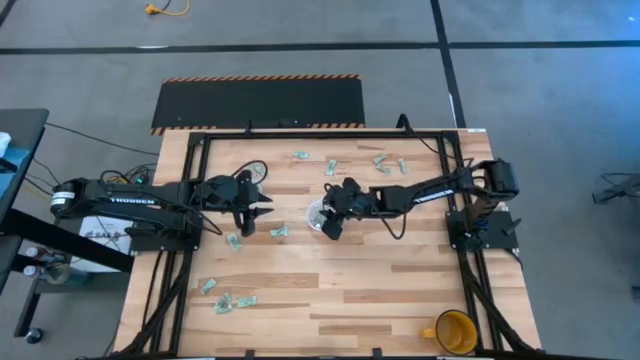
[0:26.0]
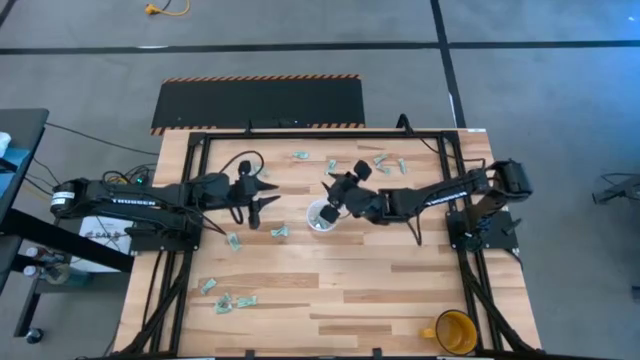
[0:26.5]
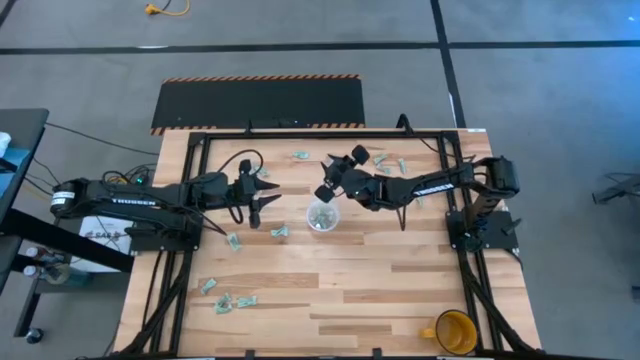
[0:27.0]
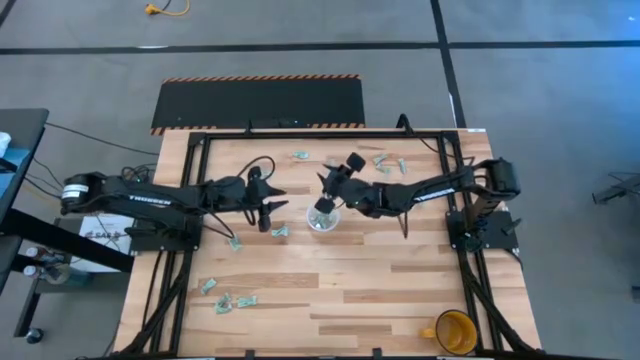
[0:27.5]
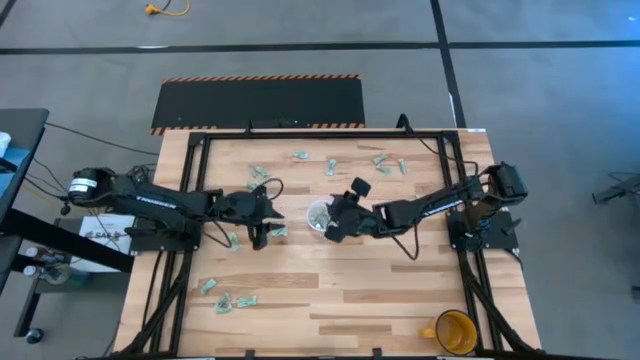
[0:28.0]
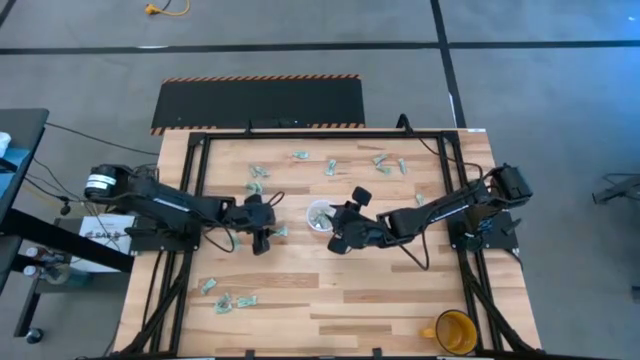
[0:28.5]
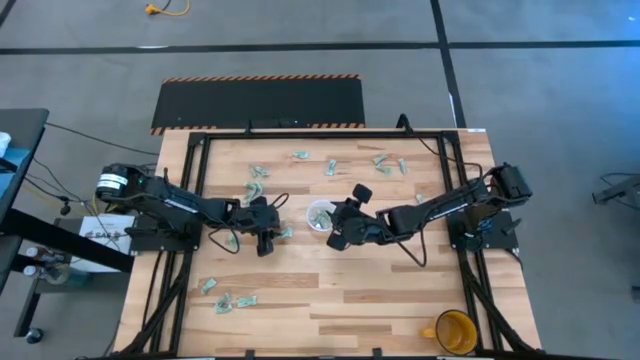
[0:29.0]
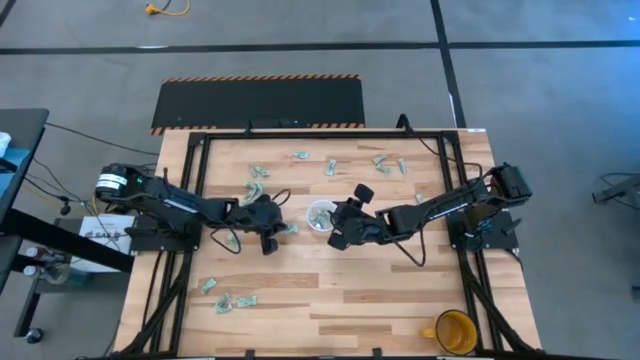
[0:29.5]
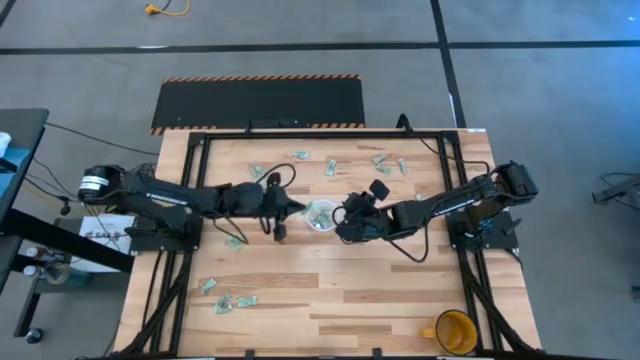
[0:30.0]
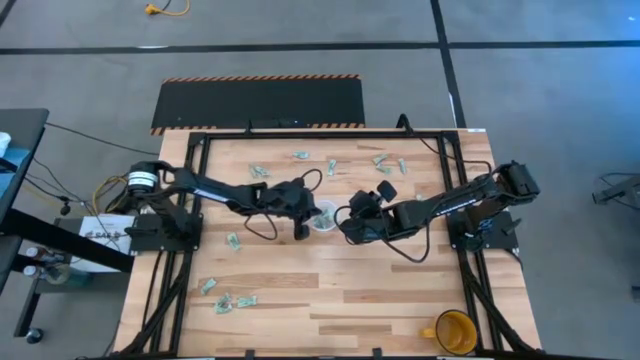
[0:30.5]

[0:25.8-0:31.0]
Task: Pick and place Stevia / Truvia into bins
Put the green stevia packet into the transparent container

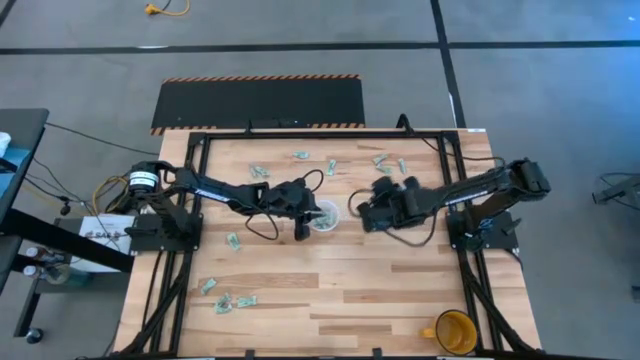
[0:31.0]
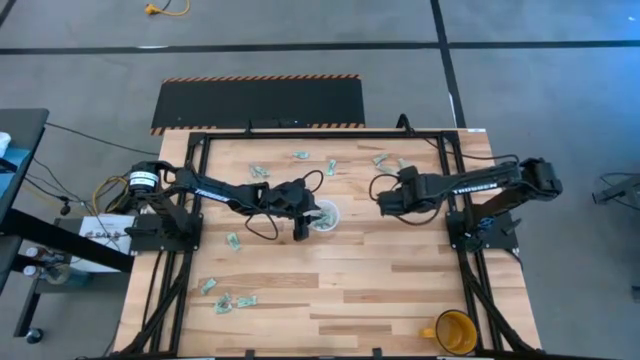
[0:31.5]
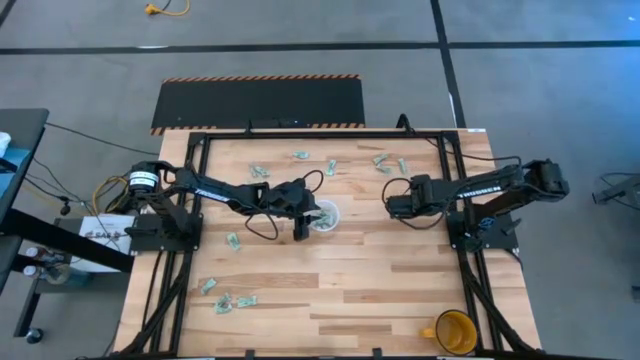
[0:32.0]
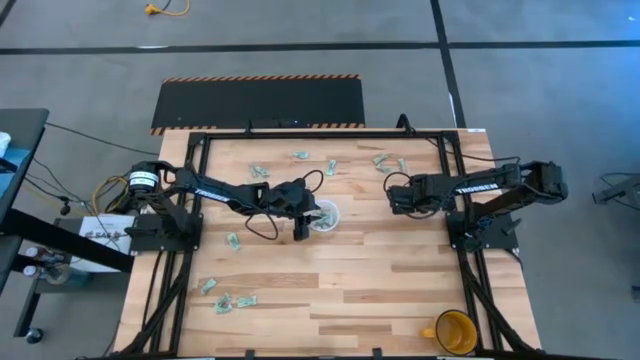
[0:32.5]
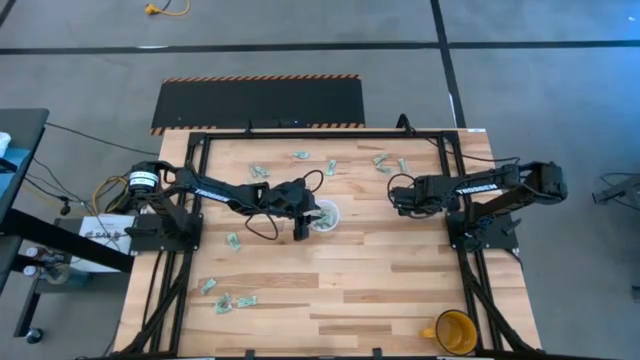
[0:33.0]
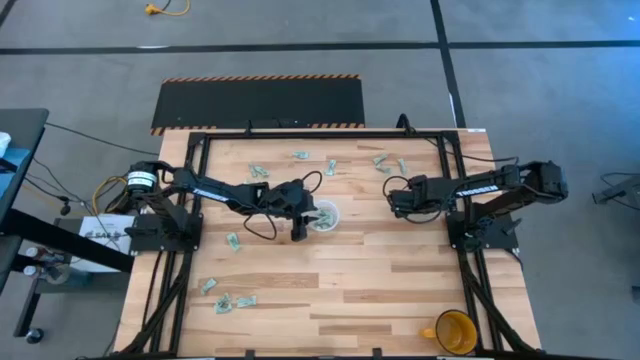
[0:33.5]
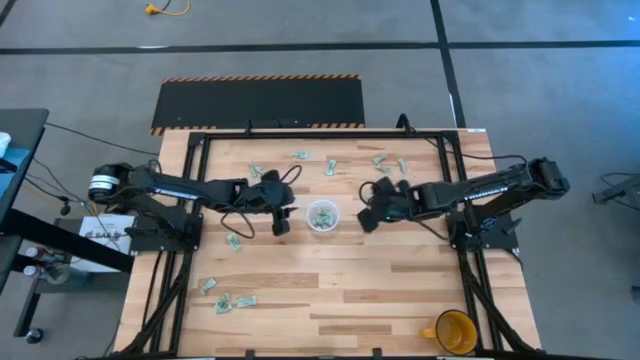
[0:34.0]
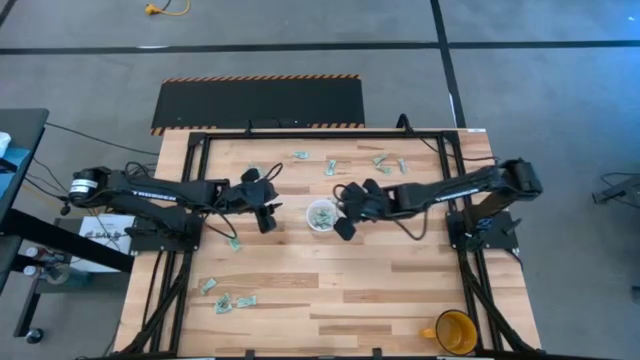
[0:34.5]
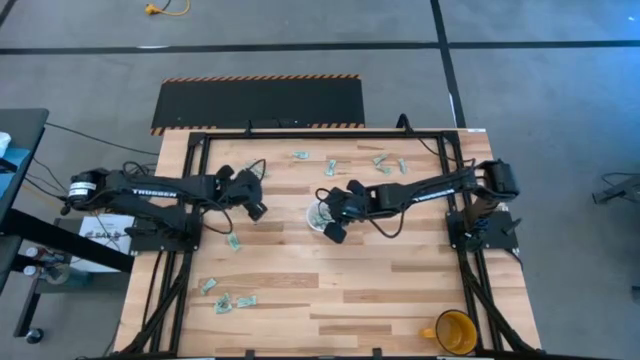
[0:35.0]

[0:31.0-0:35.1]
Put the green stevia packet into the transparent container

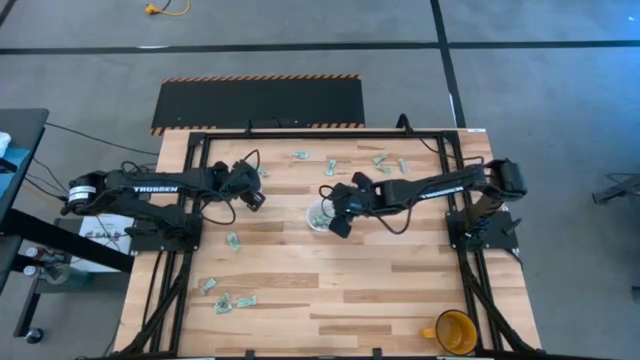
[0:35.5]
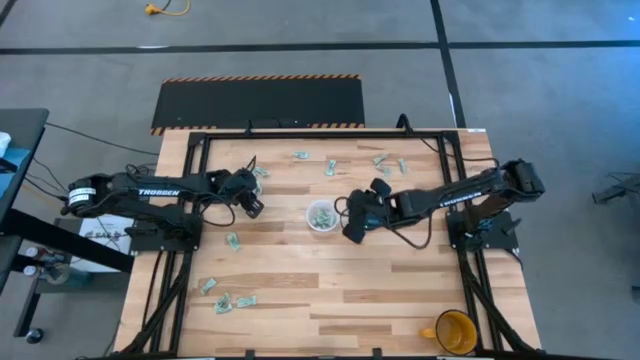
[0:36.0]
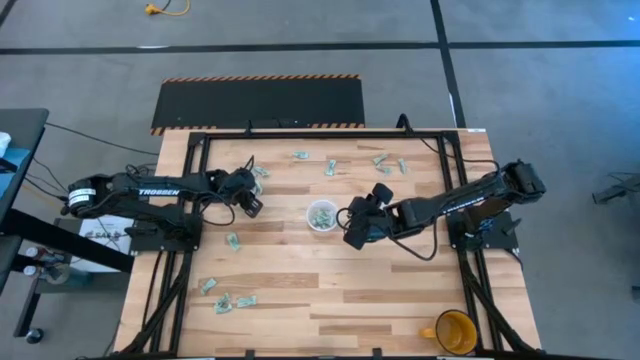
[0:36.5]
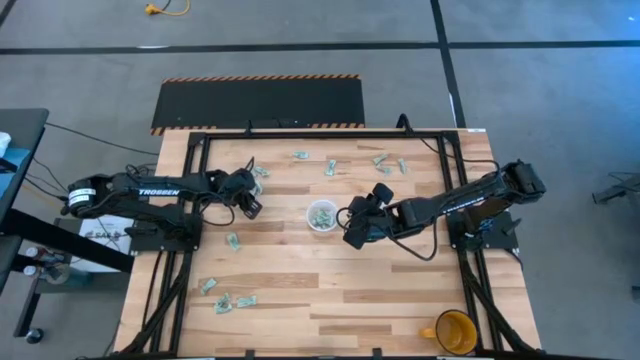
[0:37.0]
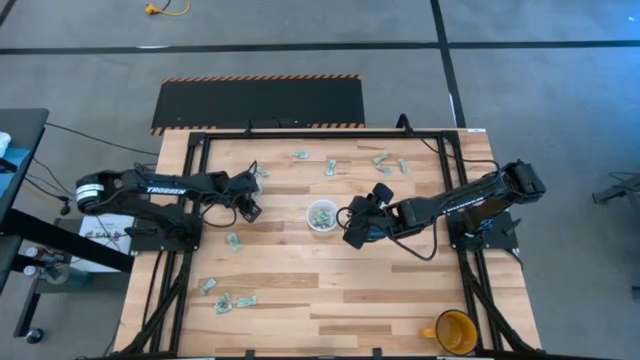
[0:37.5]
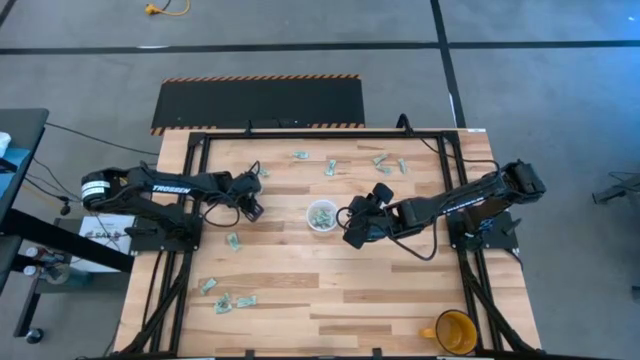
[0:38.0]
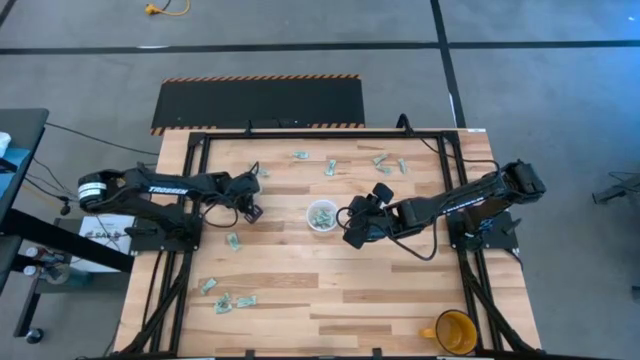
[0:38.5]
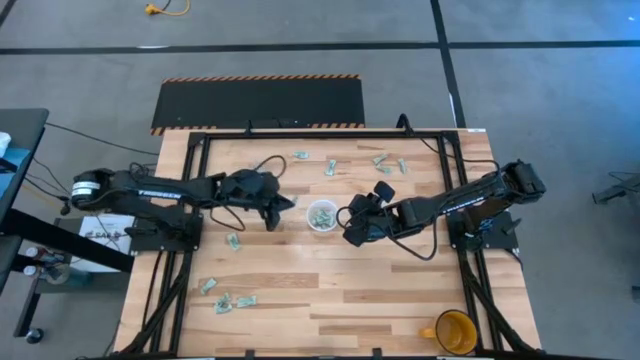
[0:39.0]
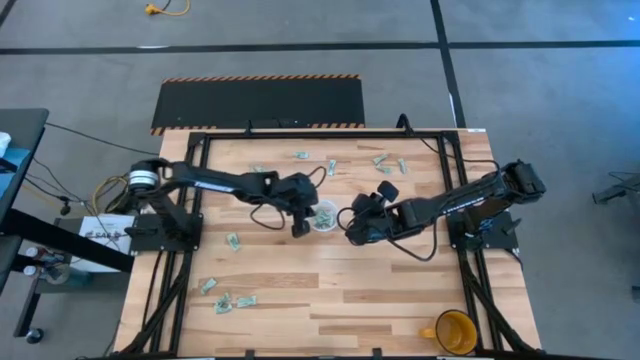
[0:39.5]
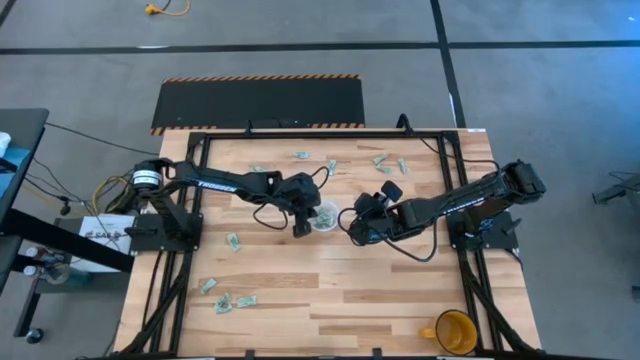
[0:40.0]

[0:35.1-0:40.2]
Put the green stevia packet into the transparent container

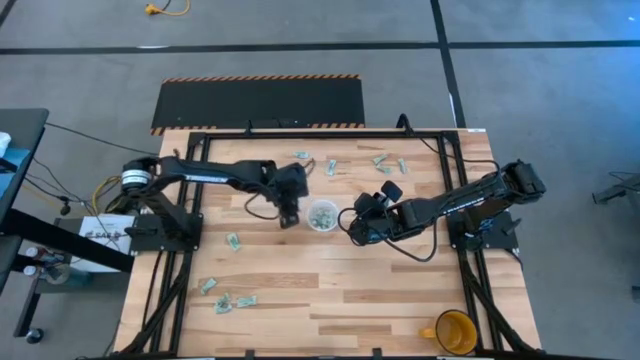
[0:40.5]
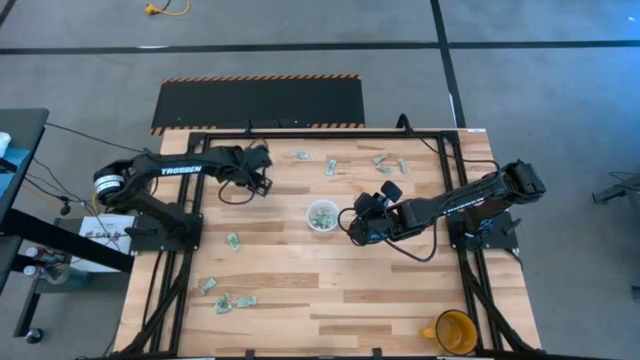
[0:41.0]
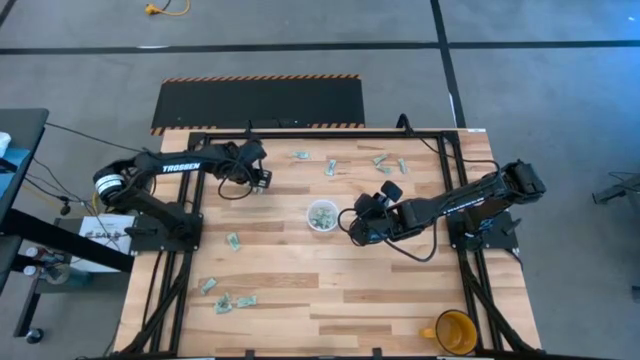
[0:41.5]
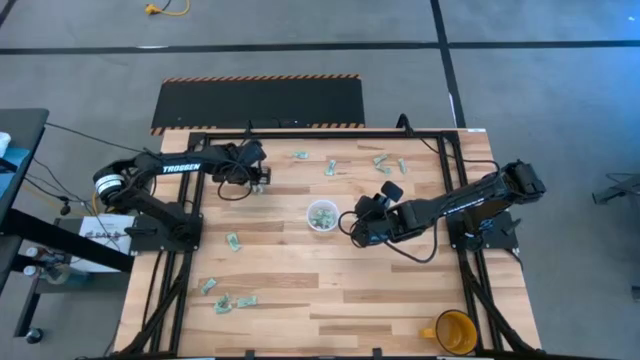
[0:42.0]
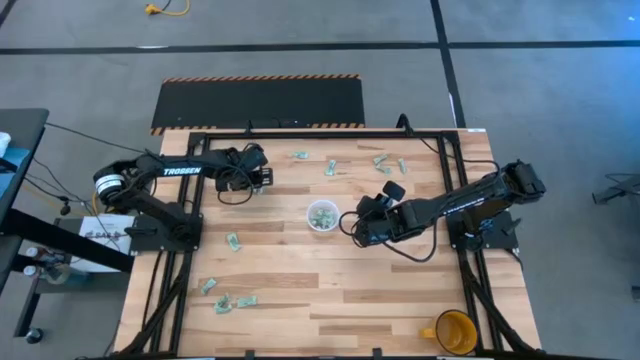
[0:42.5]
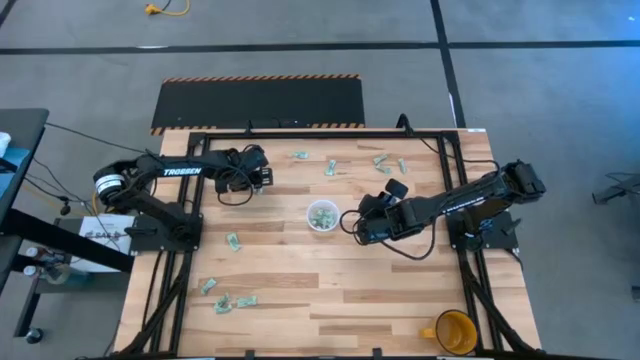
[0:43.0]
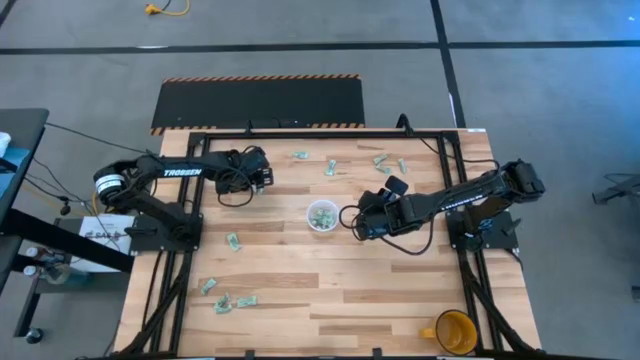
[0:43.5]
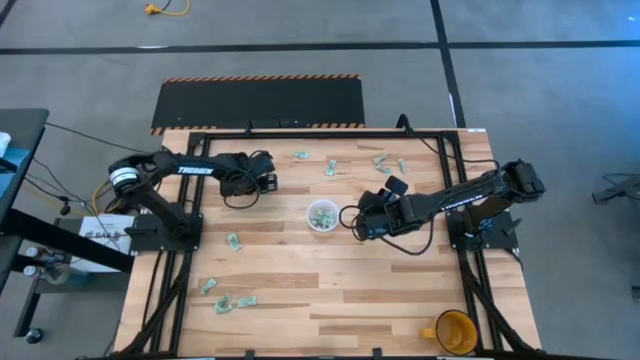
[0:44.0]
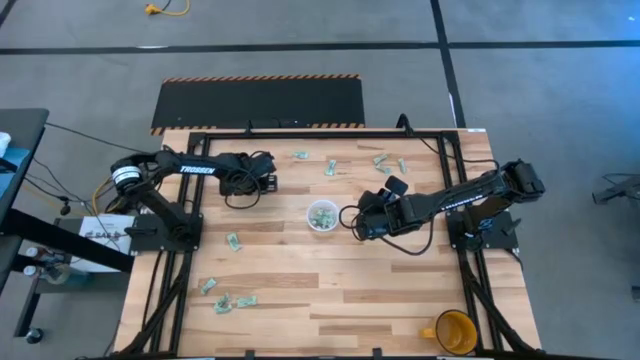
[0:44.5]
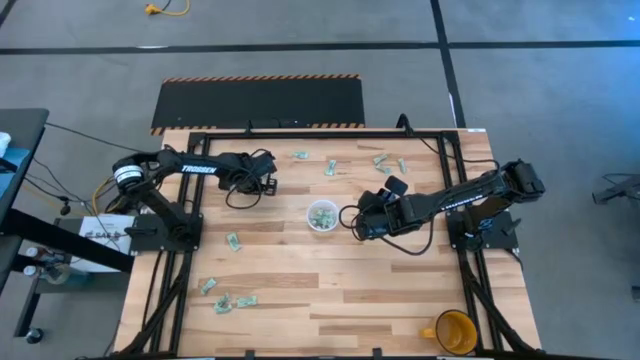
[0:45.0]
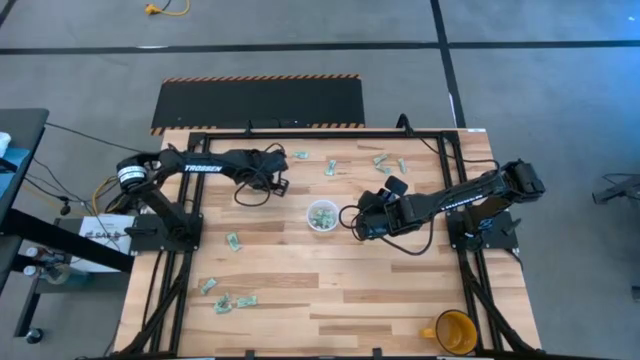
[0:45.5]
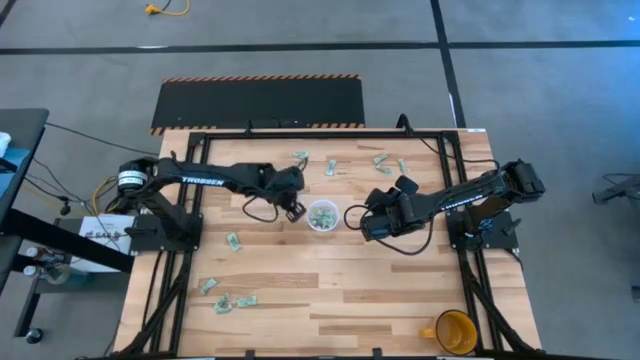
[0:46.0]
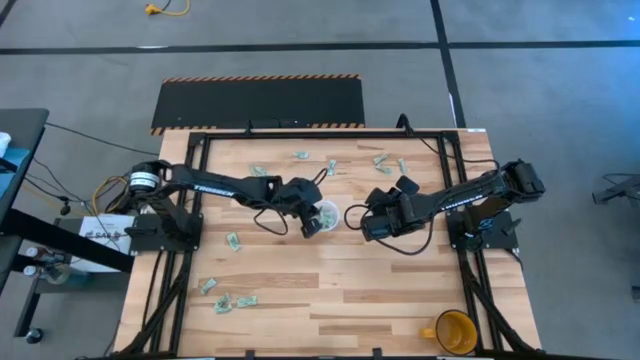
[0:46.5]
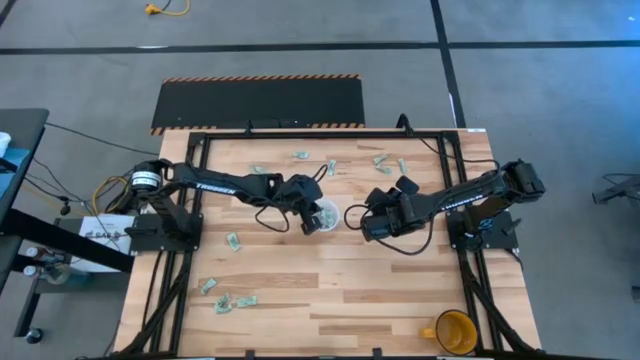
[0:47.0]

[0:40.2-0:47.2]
Put the green stevia packet into the transparent container
